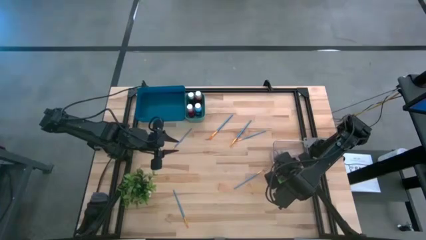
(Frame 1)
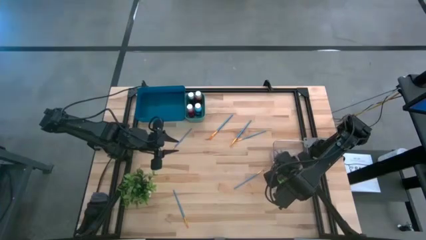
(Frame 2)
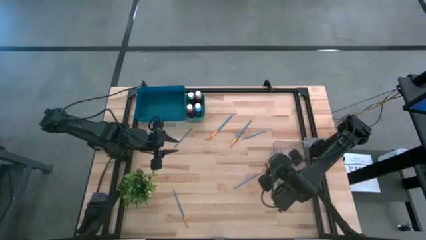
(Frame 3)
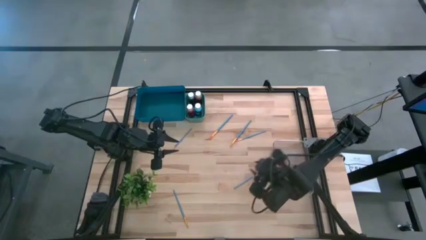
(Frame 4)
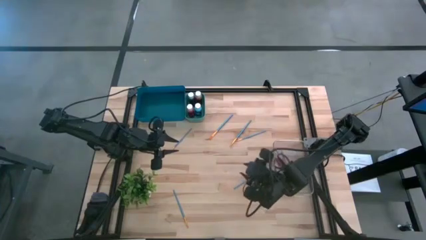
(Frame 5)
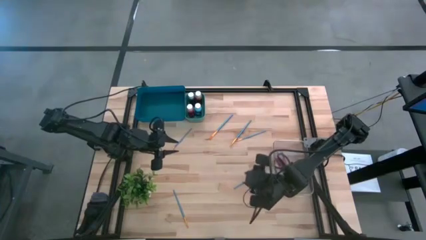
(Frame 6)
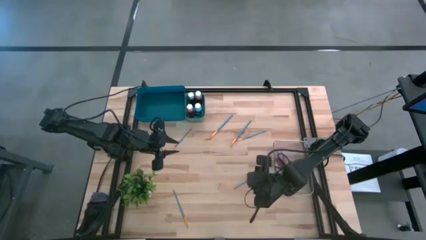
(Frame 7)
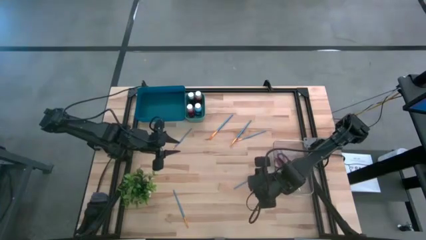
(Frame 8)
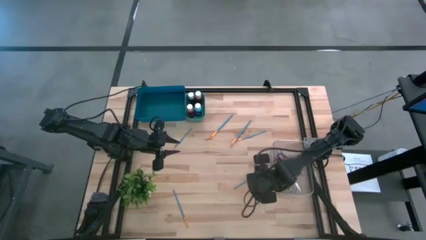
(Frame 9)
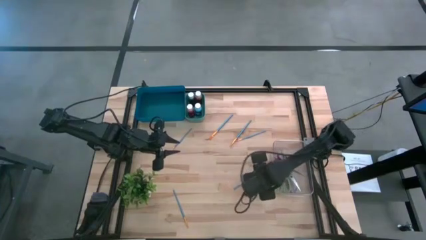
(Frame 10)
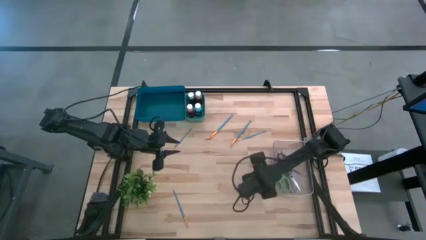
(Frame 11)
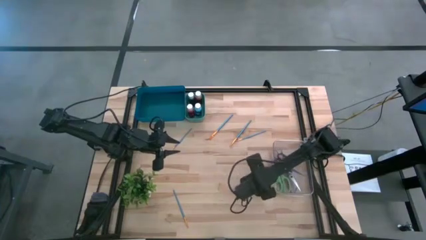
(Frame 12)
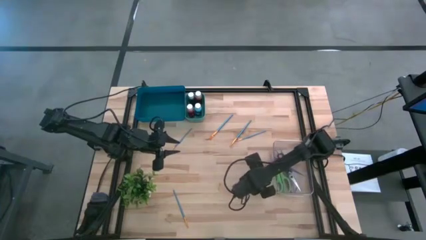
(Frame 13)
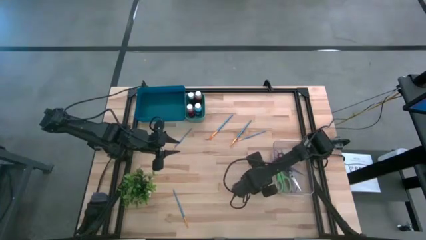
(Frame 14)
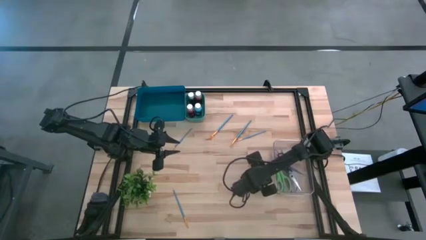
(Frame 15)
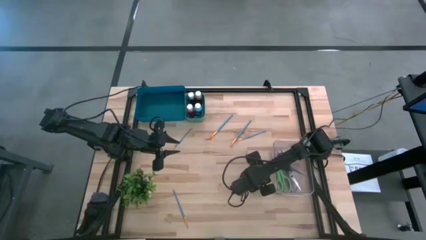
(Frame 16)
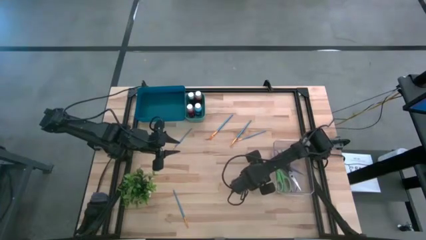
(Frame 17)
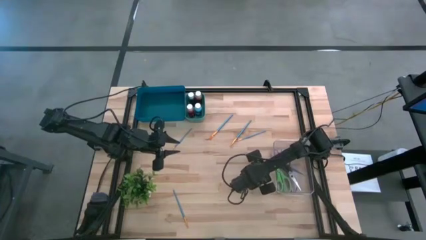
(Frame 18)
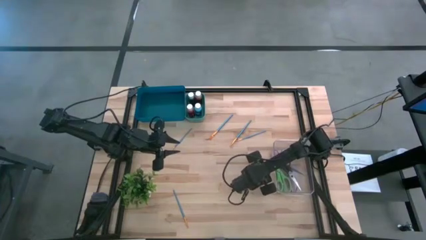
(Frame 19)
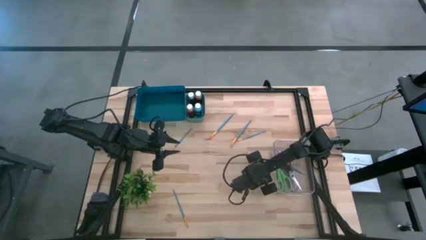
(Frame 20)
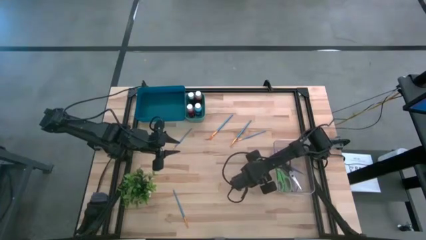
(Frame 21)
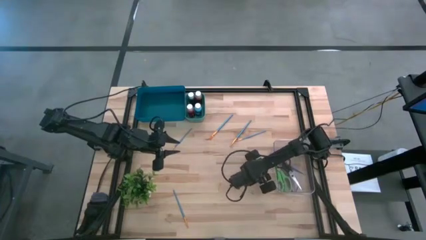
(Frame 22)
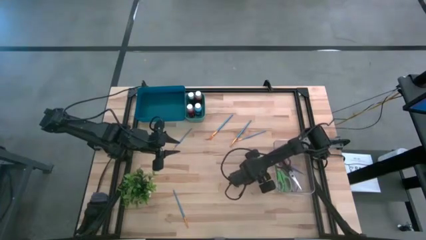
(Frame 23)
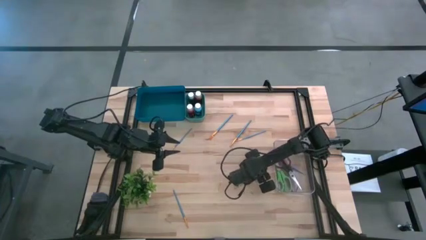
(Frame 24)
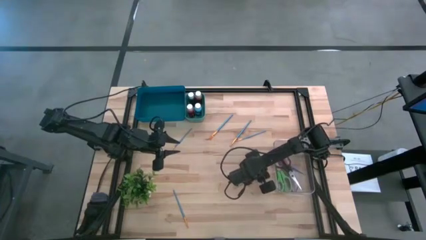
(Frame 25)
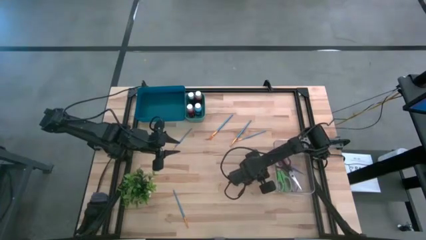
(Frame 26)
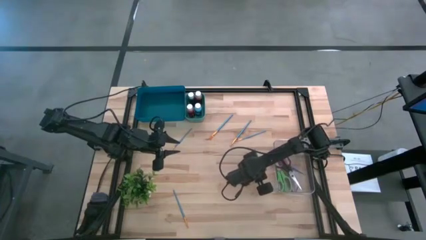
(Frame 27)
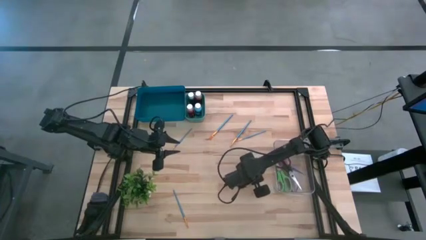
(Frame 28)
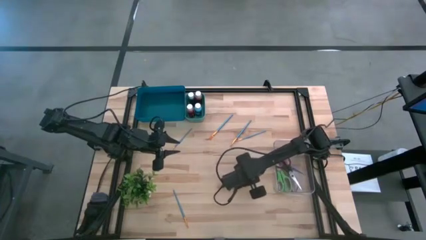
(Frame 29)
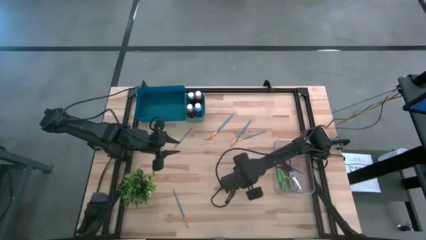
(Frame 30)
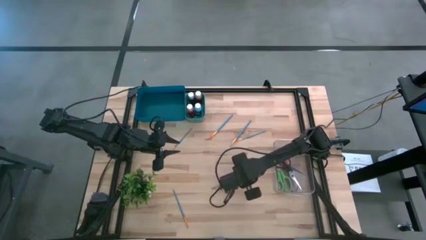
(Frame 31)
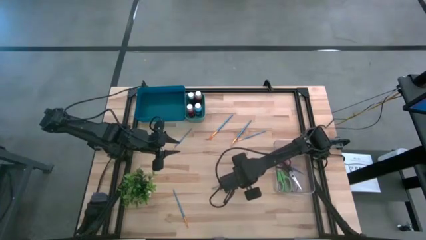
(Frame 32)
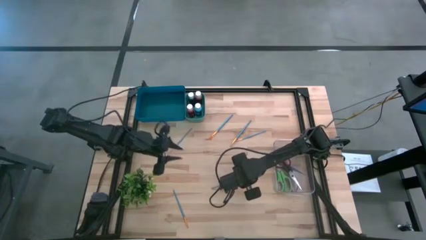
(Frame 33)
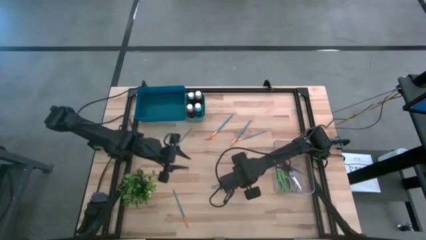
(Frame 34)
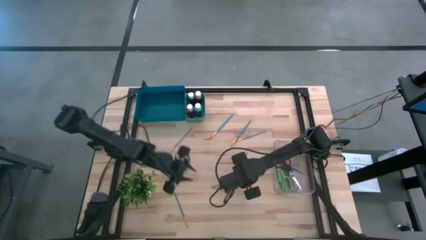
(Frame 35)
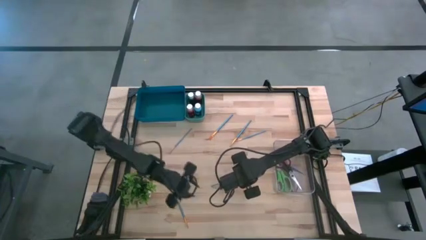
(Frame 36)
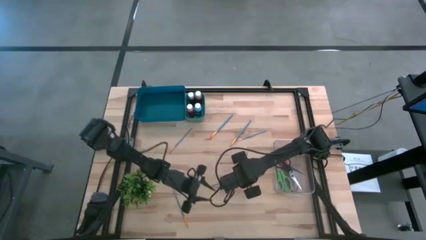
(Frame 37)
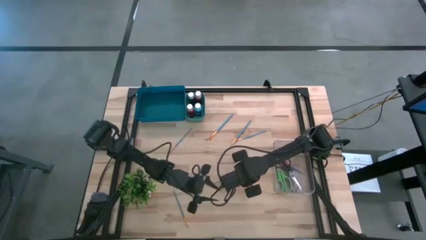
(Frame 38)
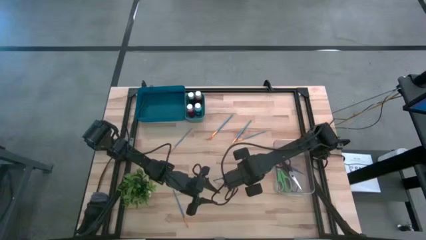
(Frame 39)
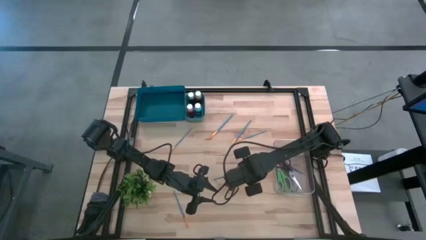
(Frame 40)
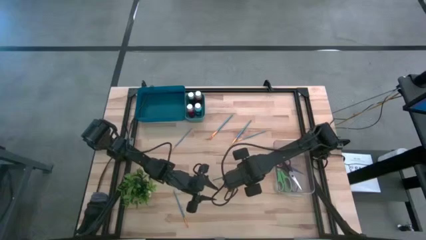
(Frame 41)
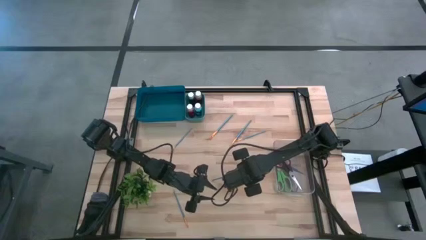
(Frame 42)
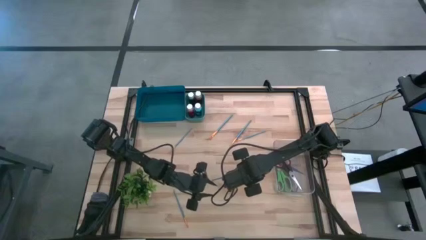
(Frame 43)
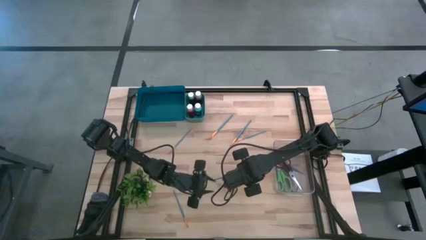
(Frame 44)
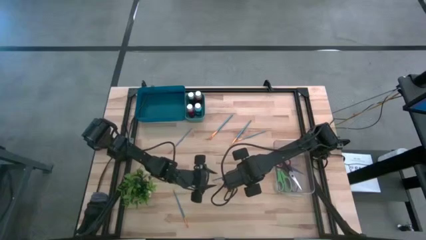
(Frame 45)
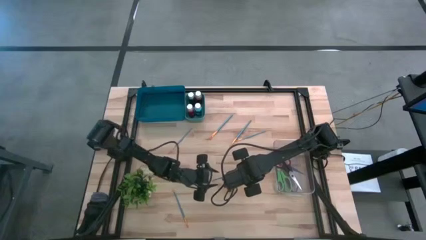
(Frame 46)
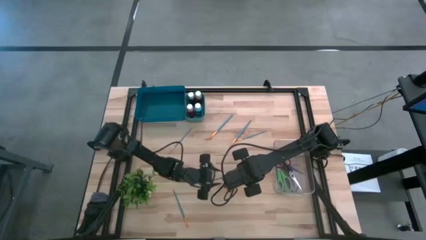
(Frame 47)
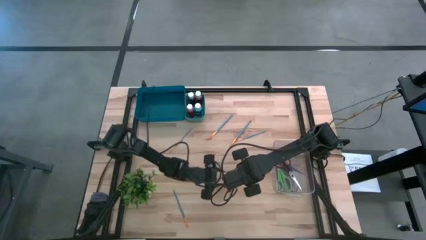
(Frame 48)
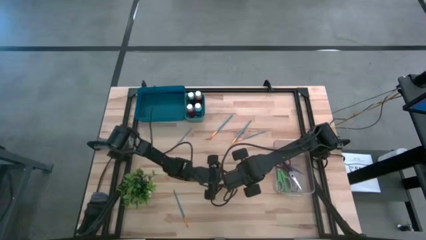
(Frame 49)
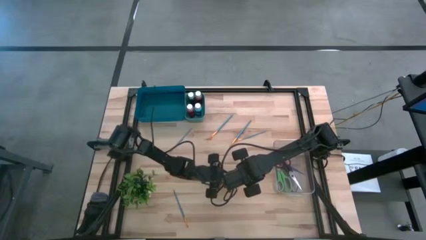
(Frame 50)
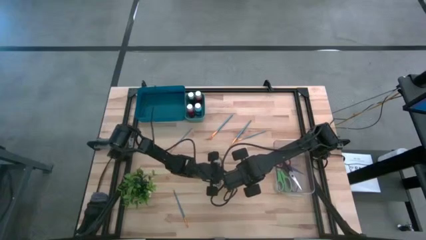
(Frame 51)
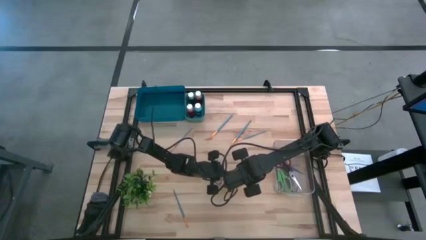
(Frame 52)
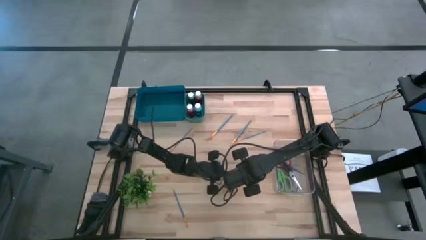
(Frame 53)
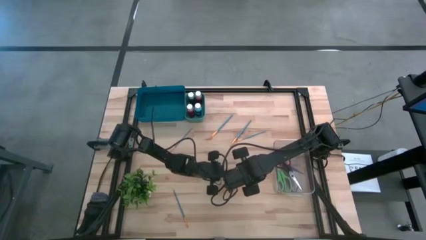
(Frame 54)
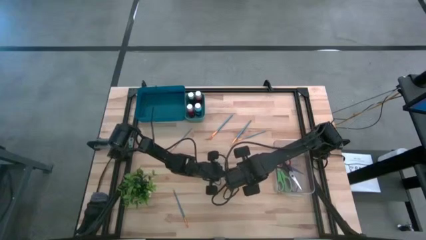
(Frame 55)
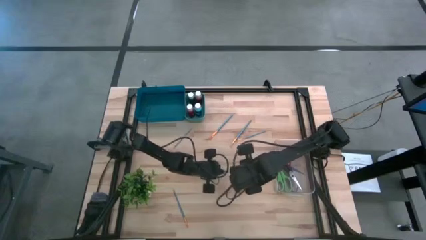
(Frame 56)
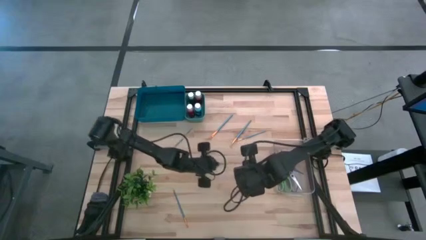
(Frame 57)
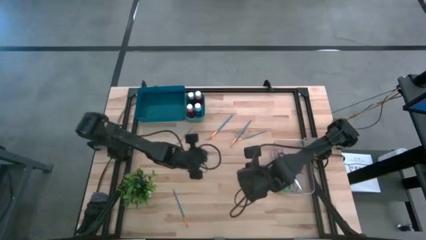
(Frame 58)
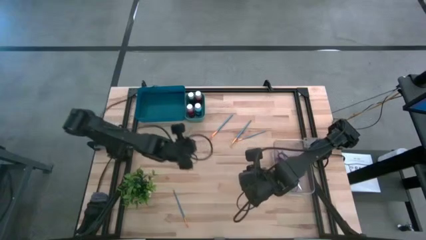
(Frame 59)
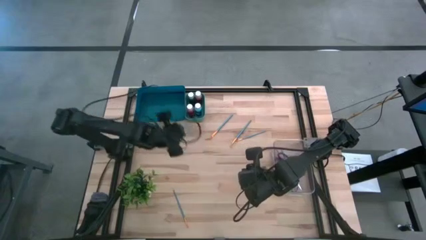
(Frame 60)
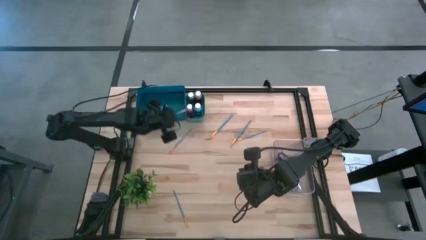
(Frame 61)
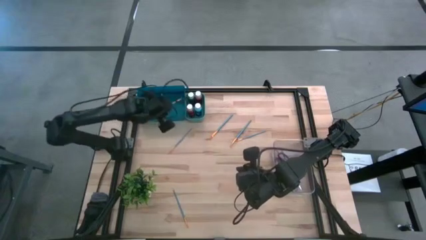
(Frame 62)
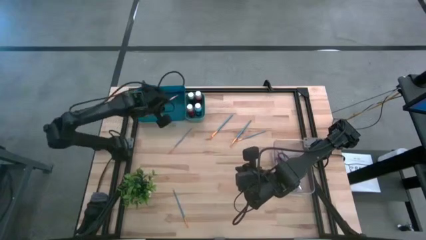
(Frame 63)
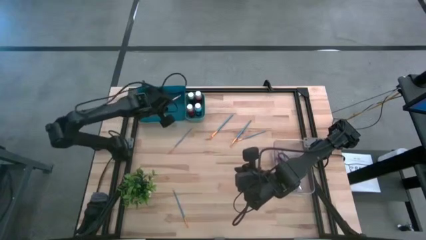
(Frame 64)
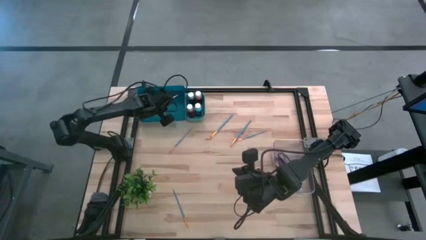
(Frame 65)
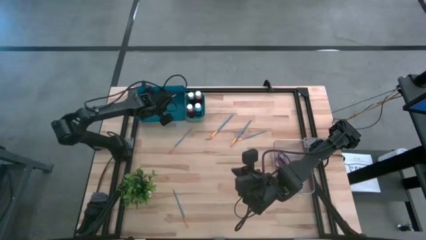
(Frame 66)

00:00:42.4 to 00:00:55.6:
Task: Pick & Place Paint Supplies
Put the blue paint brush into the blue bin

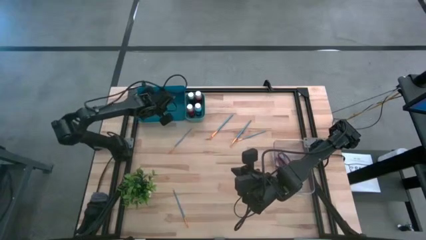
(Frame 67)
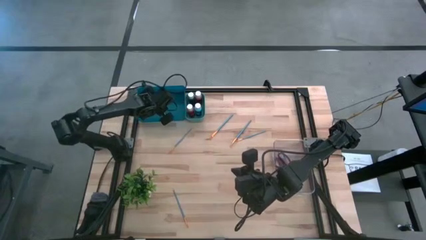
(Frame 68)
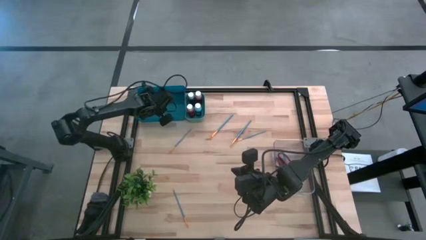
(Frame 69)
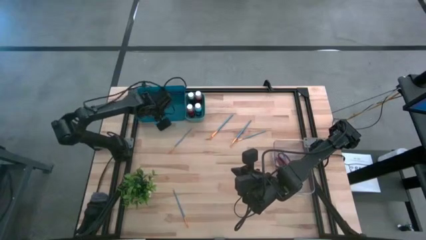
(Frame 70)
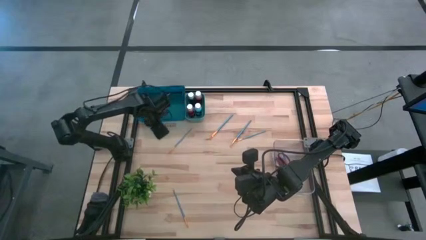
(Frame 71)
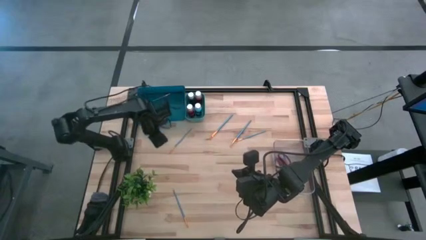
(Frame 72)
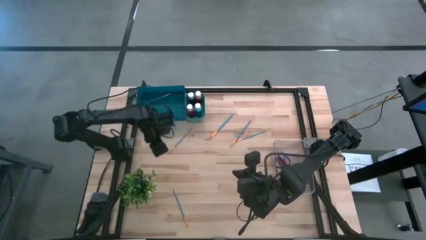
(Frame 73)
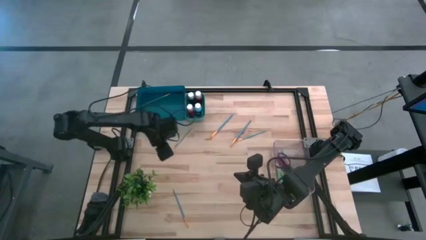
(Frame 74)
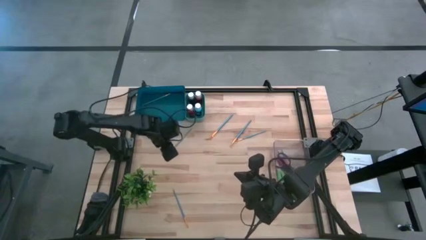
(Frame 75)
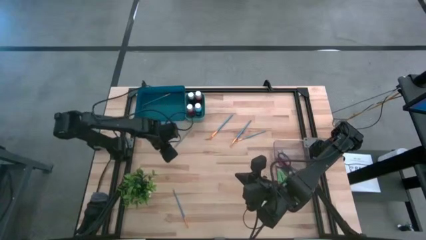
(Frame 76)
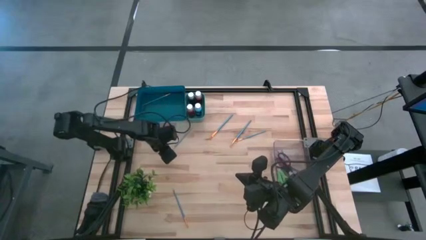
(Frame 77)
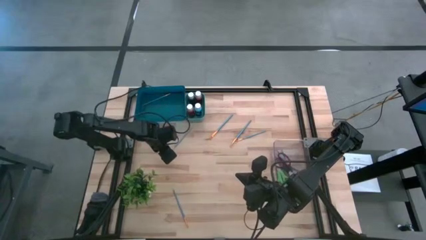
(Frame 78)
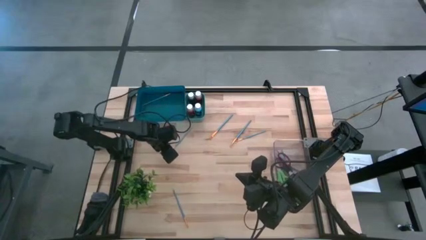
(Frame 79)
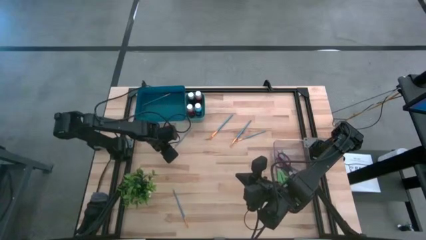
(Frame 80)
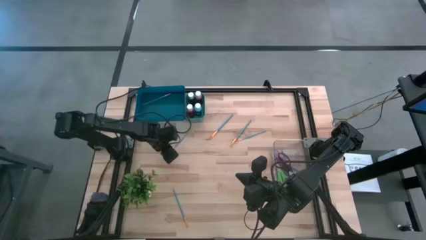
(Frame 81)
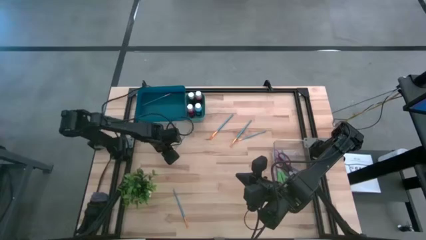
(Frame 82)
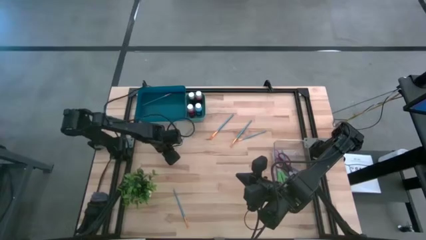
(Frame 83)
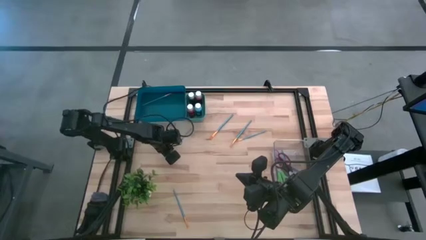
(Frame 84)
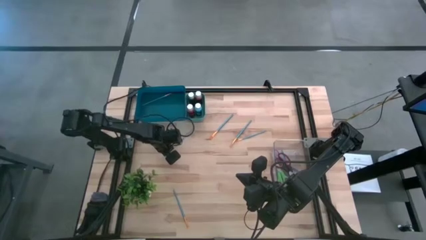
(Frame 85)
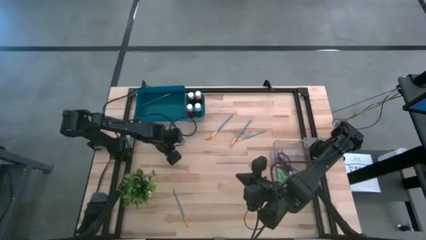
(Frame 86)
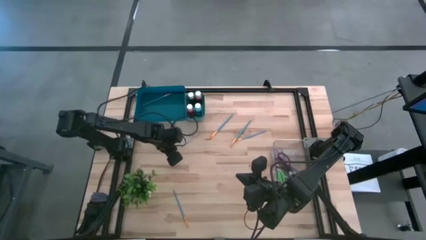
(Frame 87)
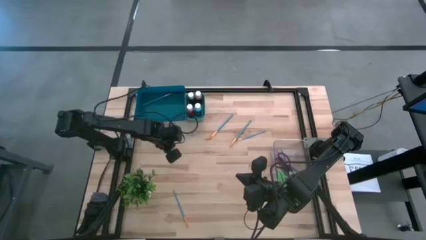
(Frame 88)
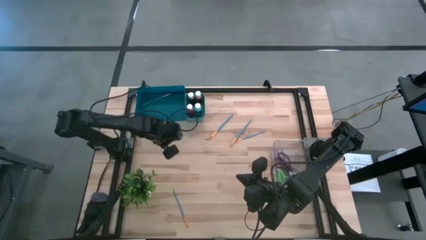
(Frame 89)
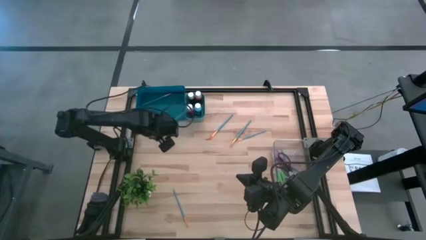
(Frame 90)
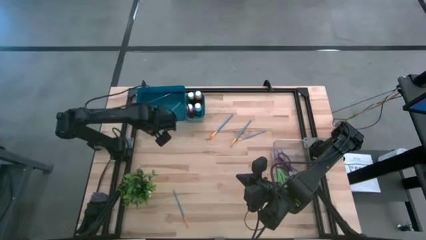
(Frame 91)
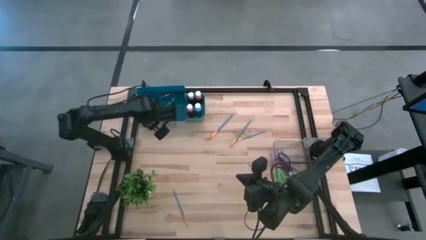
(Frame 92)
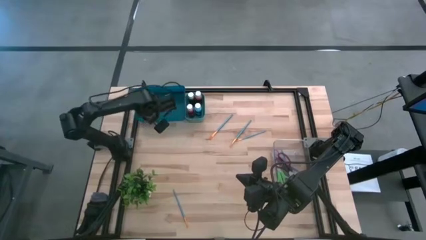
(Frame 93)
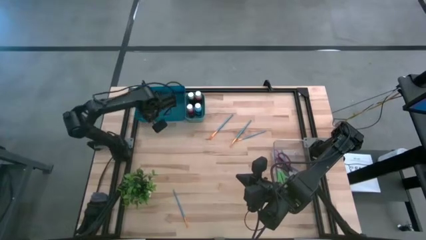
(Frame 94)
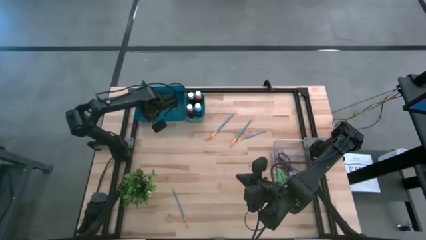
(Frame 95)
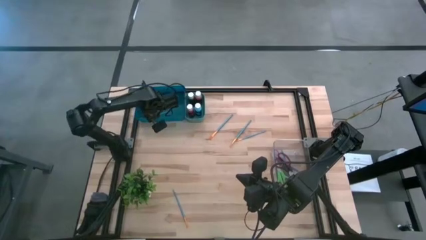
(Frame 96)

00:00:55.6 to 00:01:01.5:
Put the blue paint brush into the blue bin
